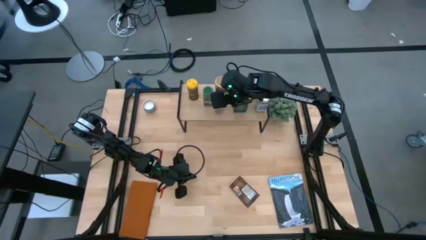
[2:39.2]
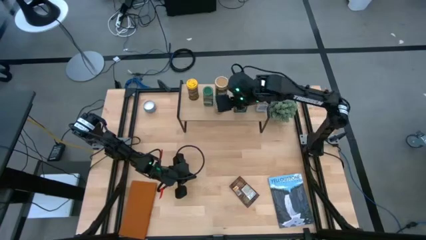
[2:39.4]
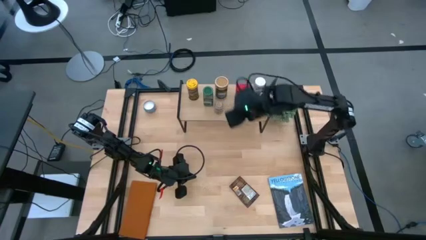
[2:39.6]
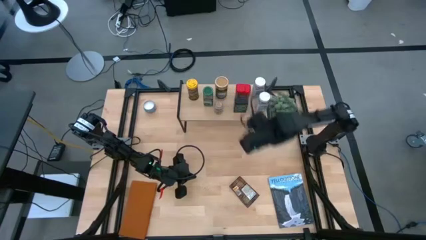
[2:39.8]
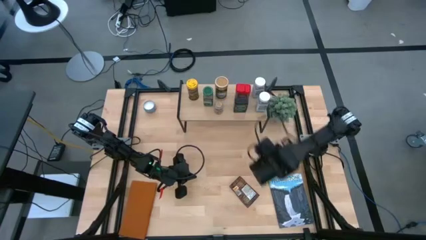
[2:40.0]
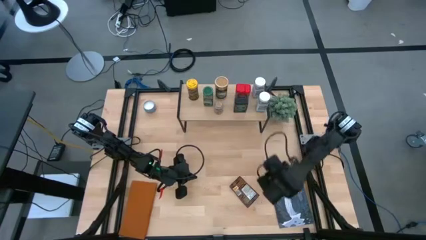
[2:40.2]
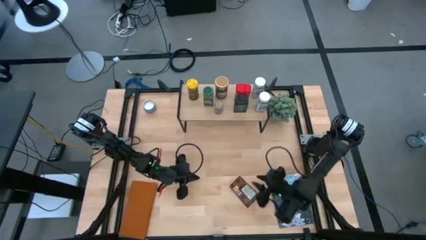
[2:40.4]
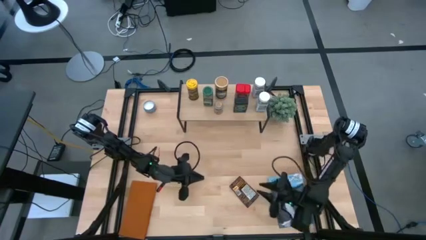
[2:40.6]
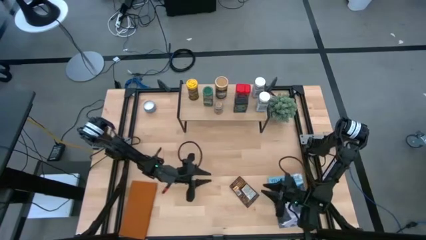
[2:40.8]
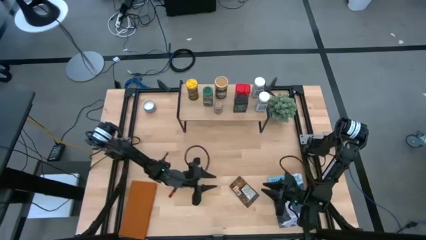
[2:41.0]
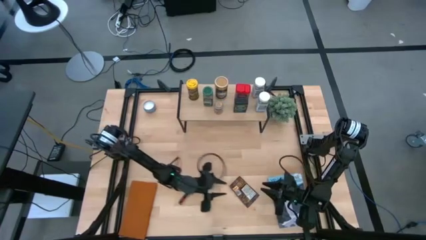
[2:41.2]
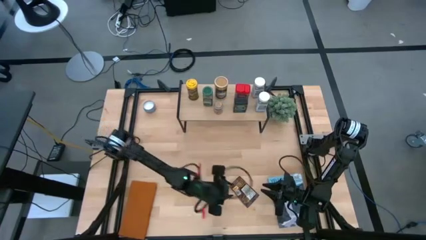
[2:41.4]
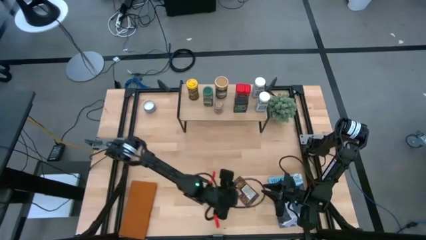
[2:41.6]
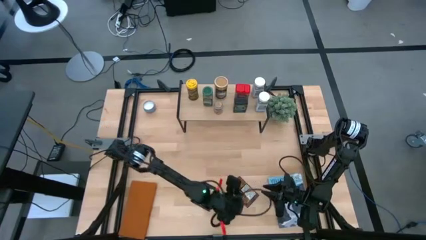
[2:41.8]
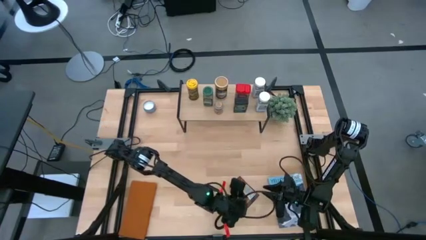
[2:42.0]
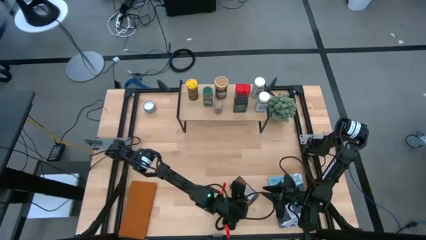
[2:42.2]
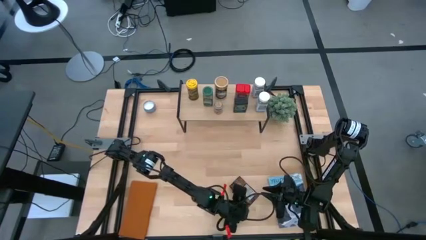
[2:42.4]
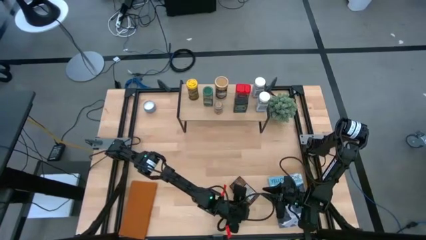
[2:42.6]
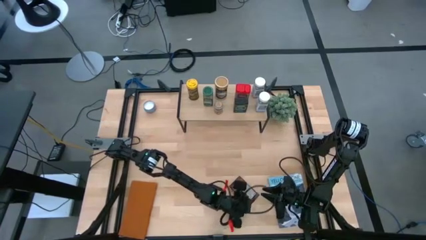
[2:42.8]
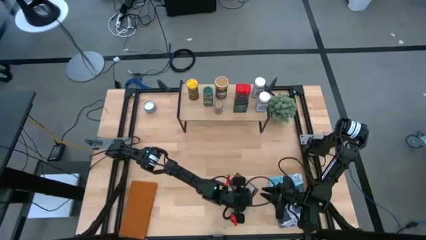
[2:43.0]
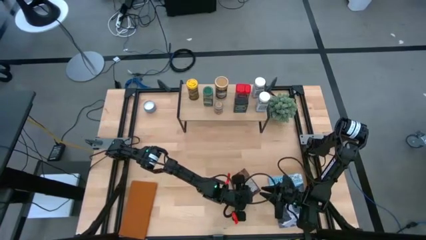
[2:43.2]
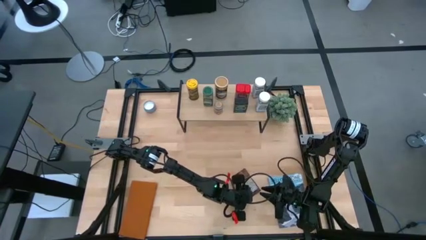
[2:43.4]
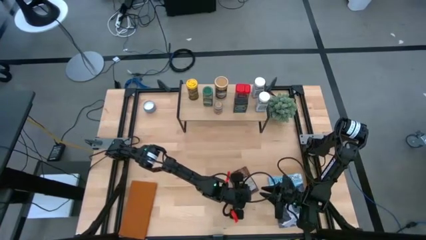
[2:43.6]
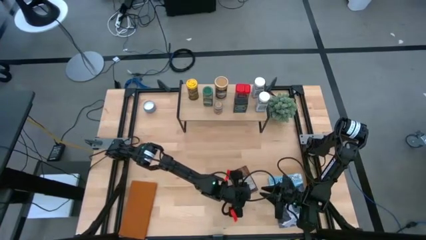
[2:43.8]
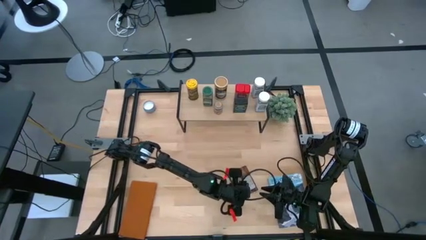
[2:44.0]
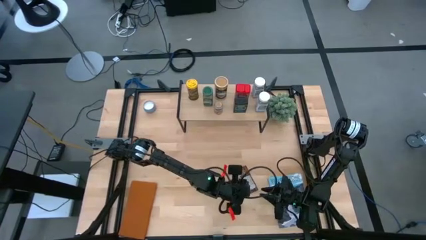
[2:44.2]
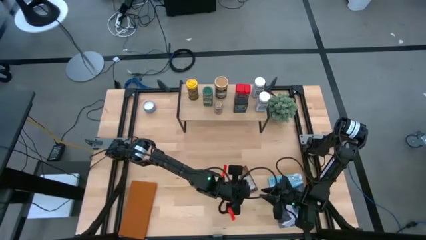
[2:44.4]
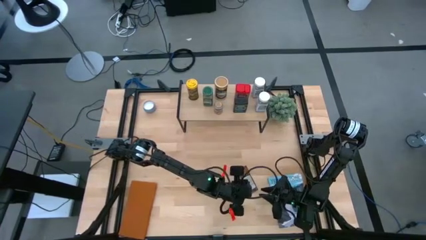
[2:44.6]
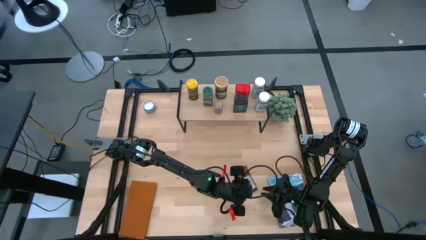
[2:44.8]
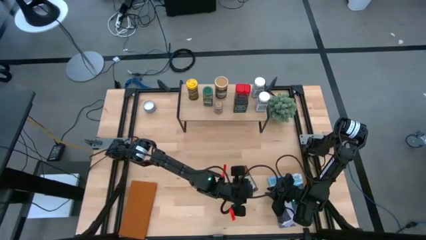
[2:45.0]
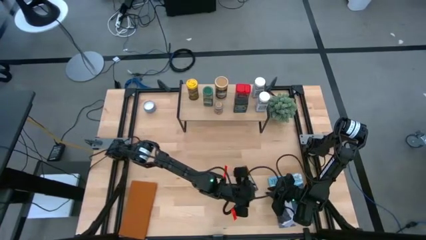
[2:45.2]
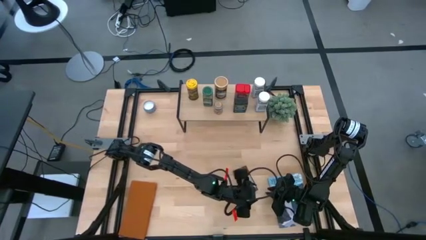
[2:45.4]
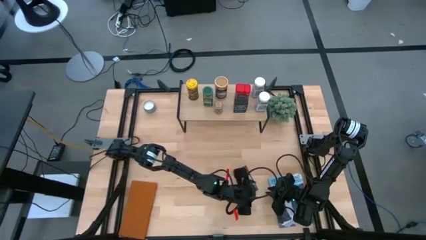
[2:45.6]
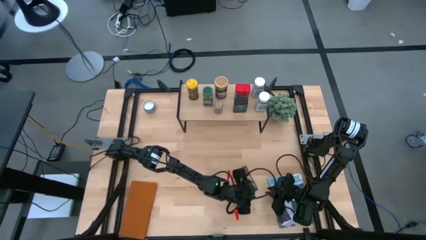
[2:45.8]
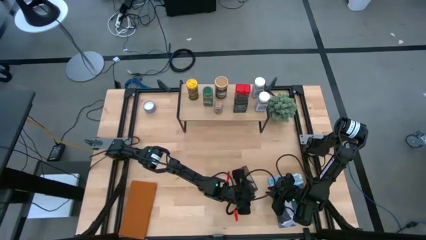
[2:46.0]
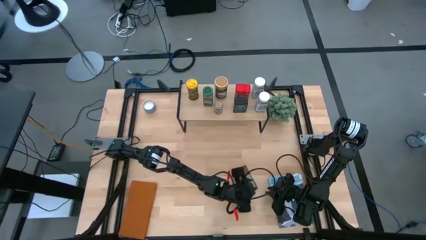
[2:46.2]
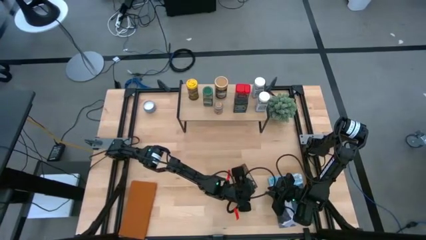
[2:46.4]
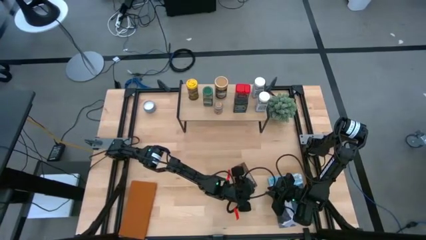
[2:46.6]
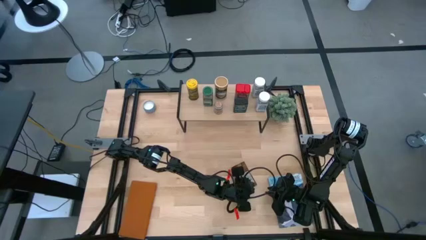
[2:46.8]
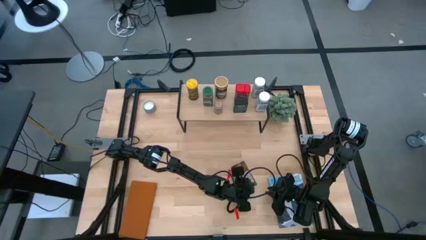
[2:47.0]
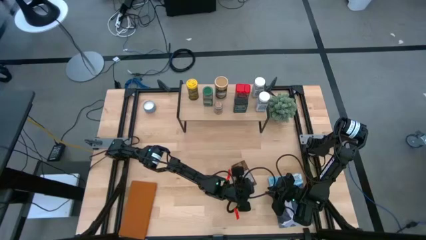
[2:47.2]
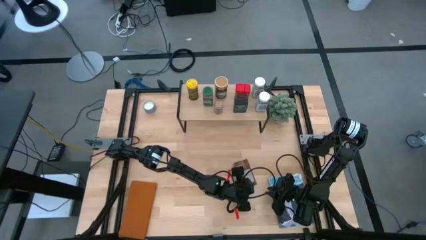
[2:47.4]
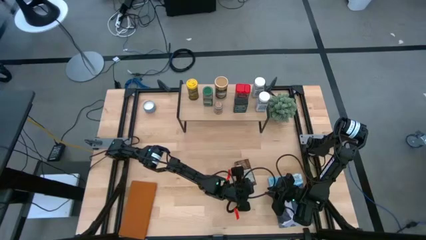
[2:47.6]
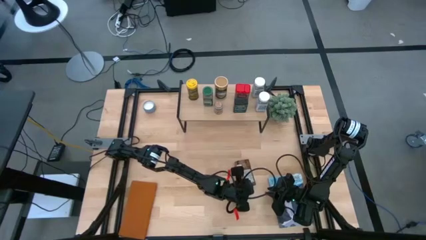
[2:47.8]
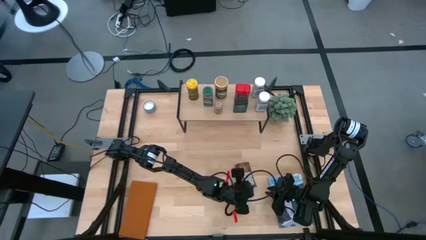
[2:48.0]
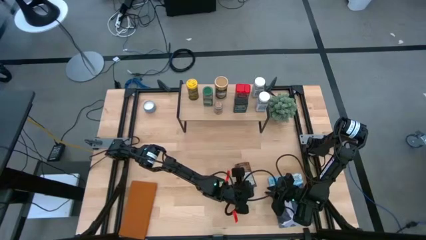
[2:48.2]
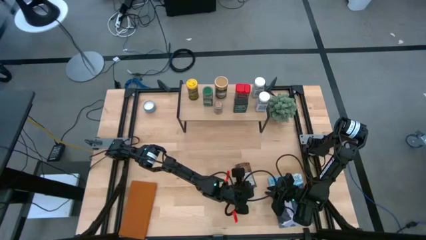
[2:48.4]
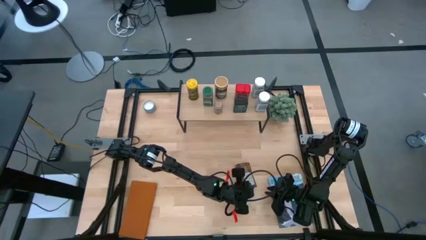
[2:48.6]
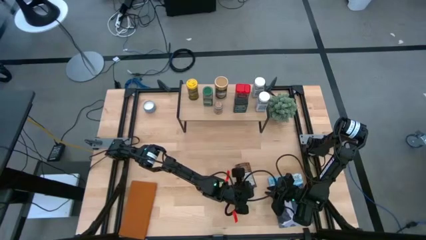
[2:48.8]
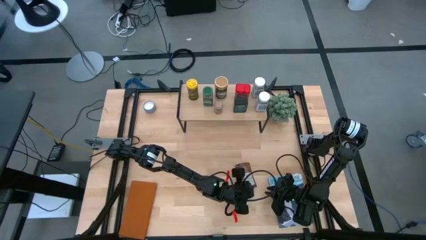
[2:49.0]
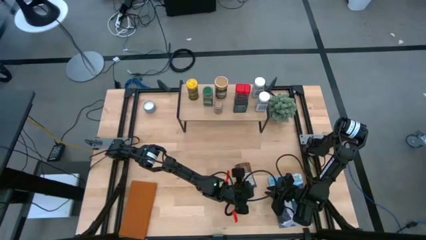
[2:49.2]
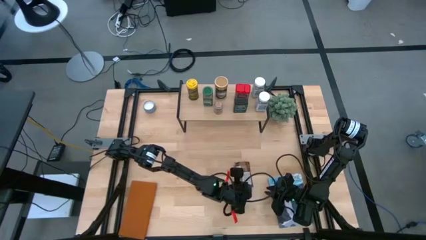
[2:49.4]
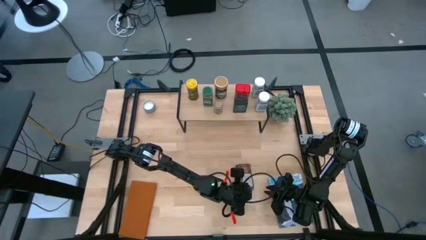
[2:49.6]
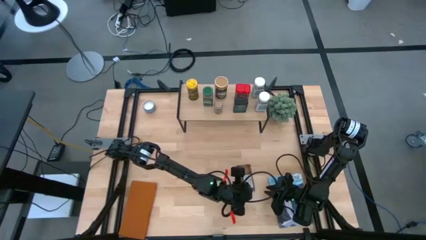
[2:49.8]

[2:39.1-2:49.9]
Task: Shelf spices
Put the brown seasoning bag on the shelf
